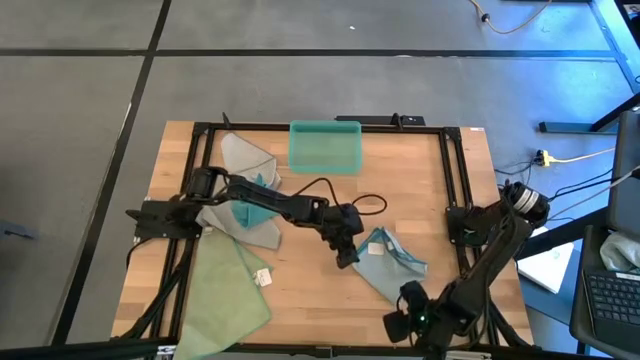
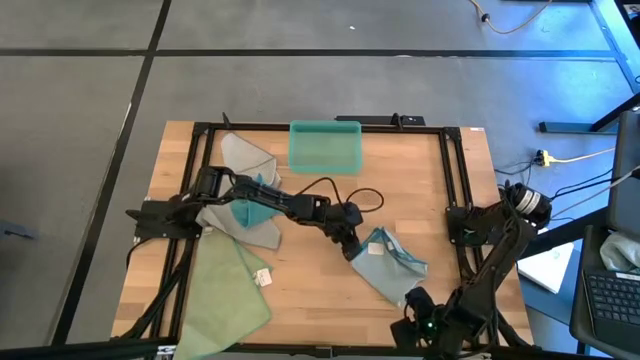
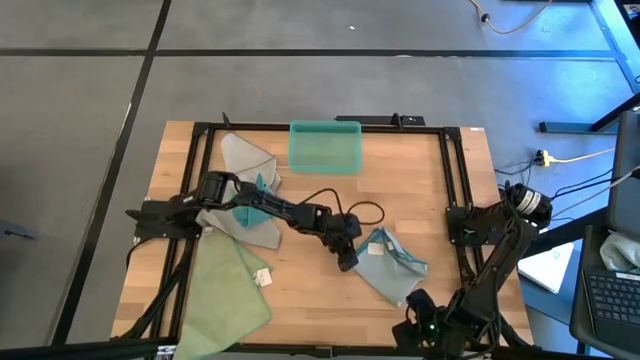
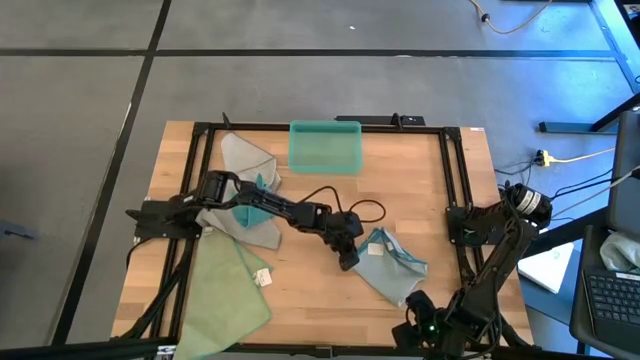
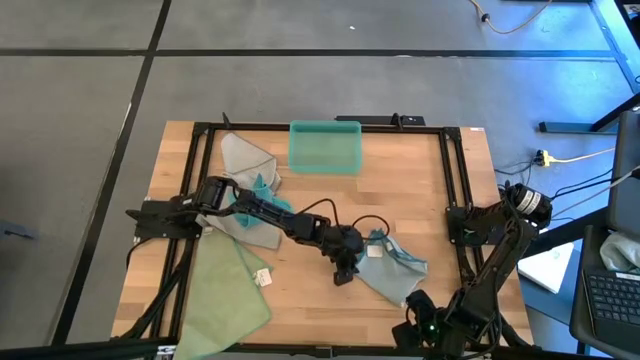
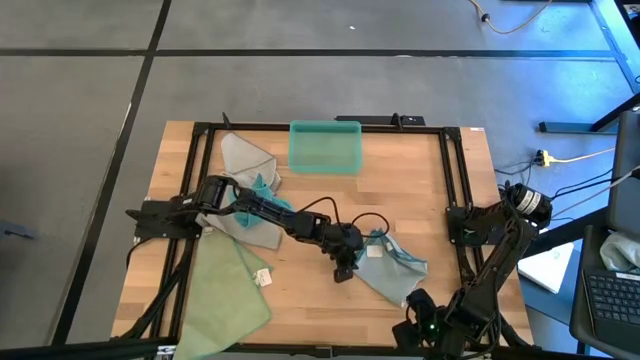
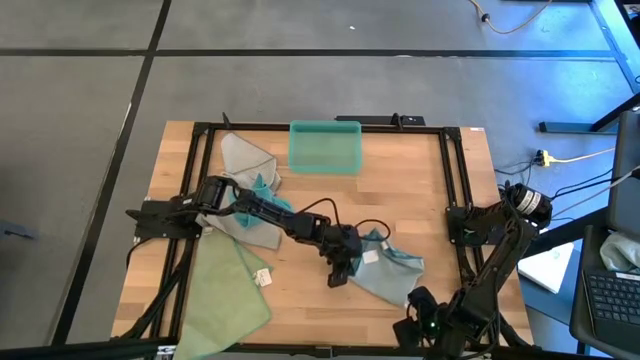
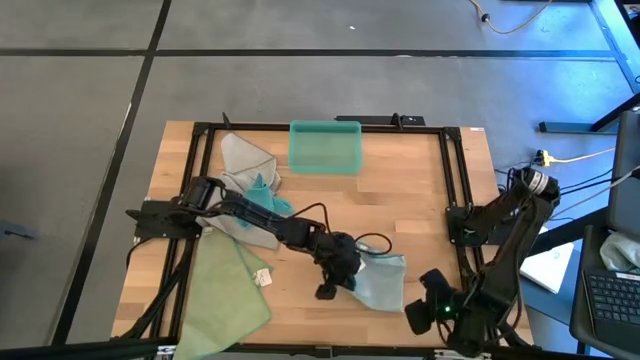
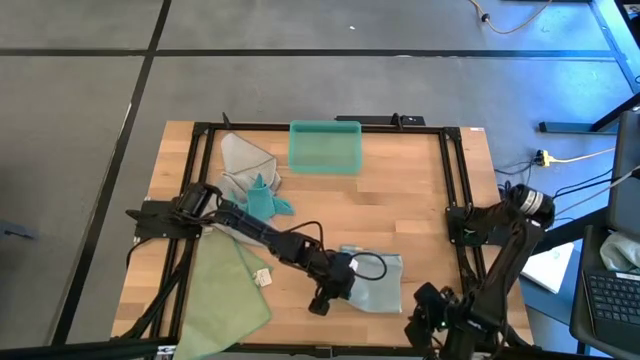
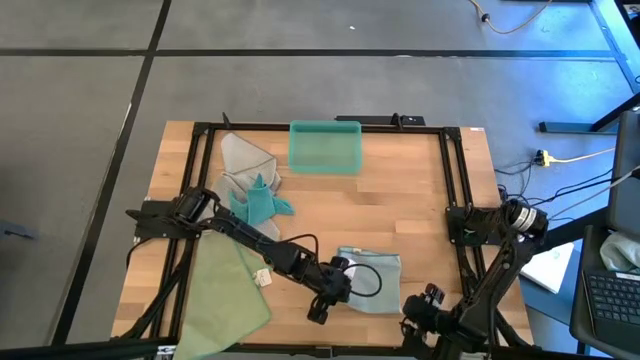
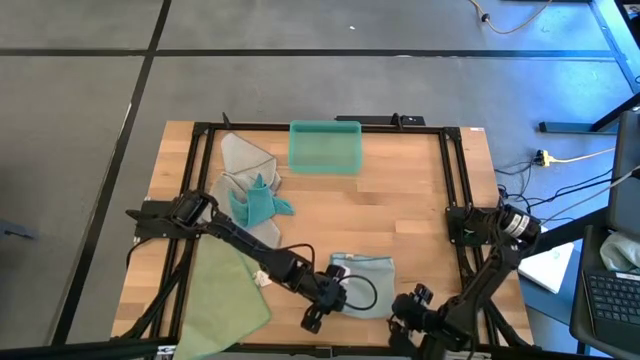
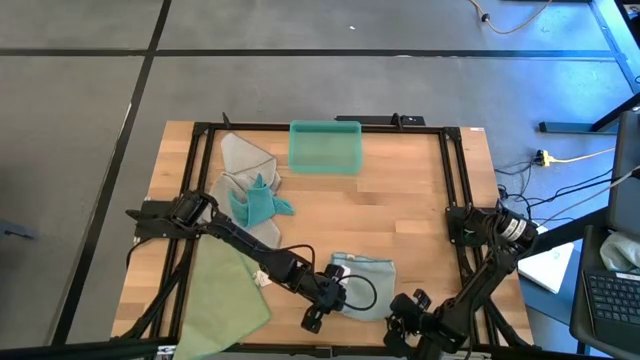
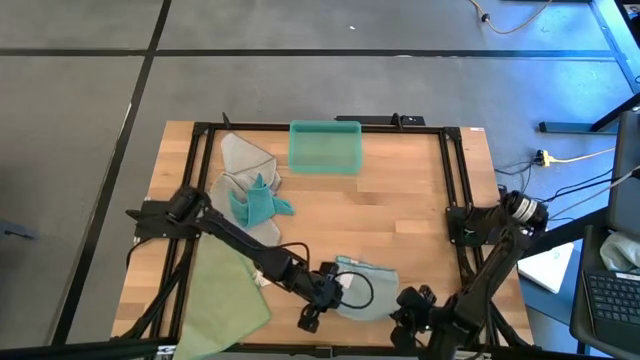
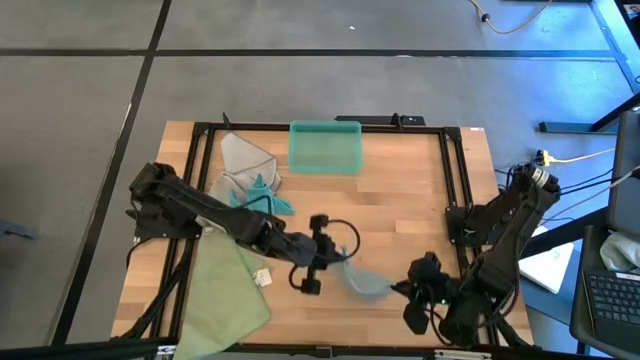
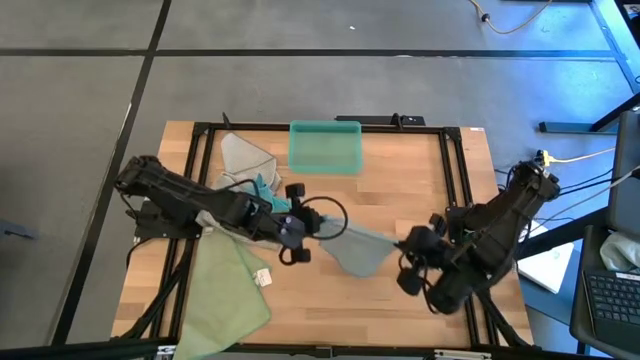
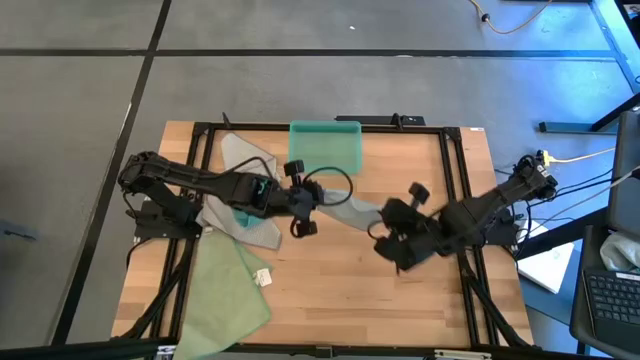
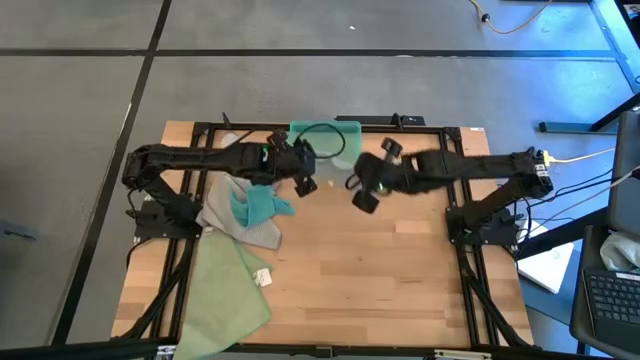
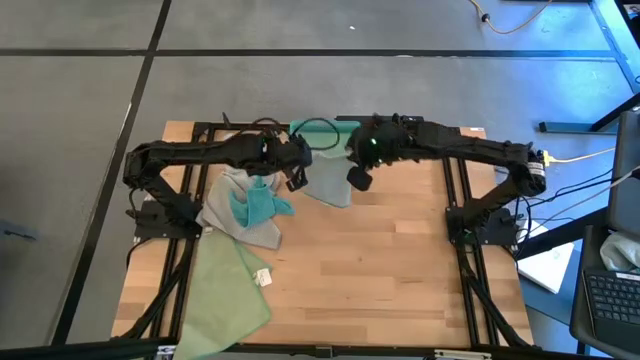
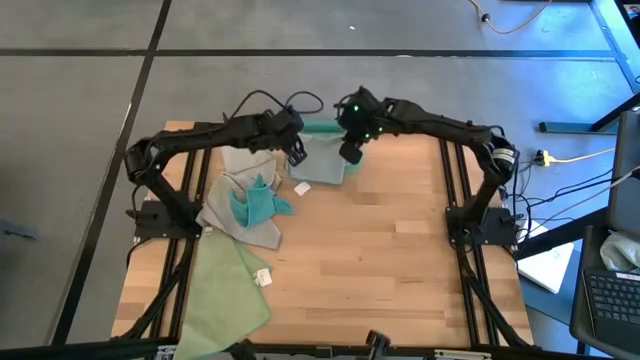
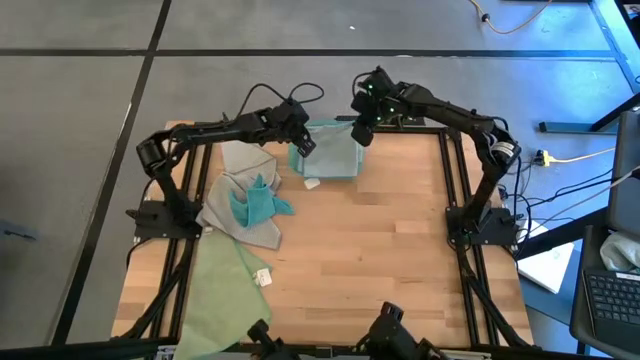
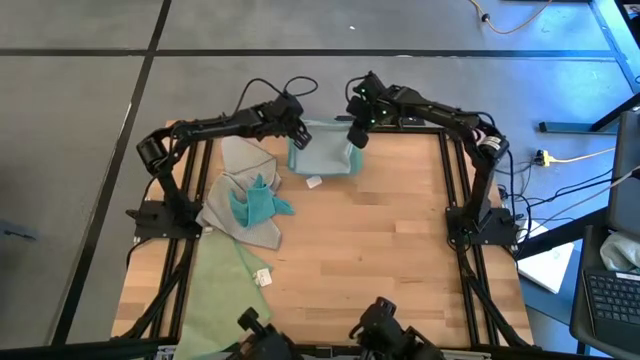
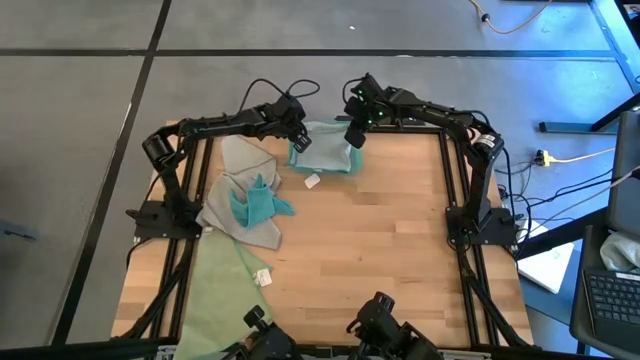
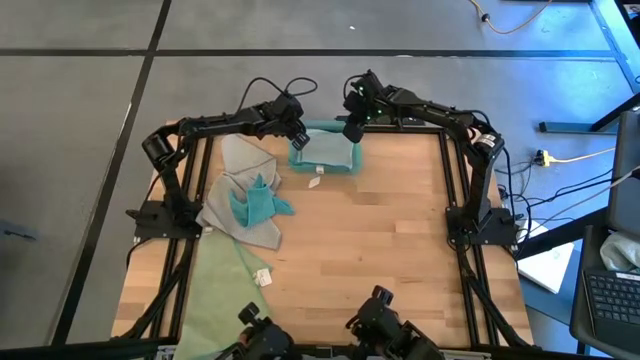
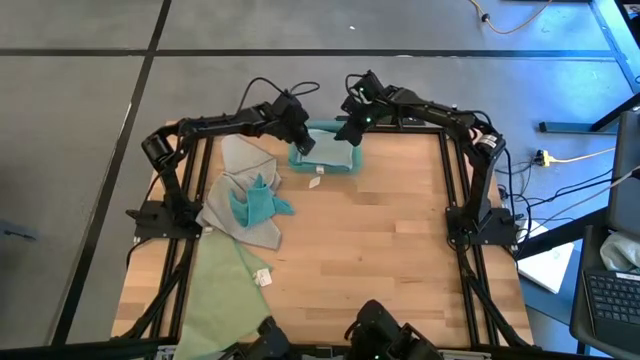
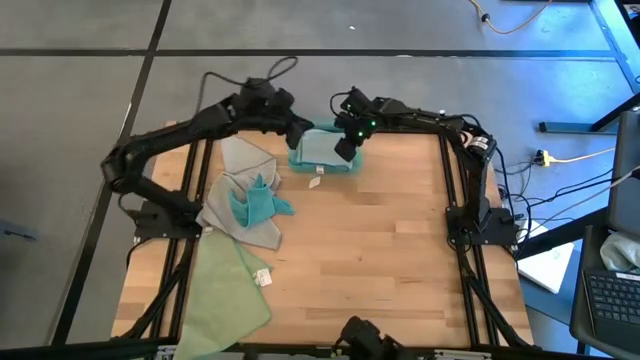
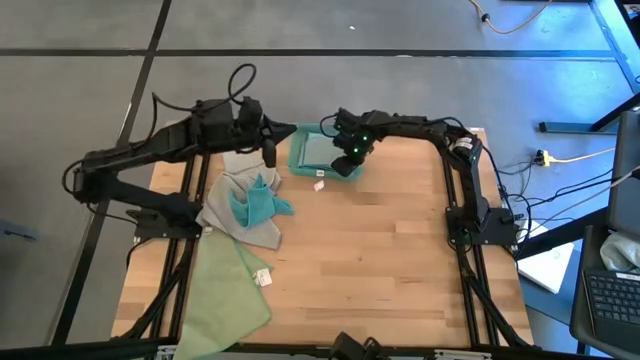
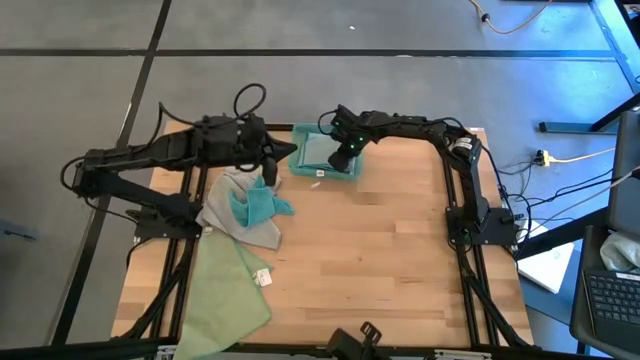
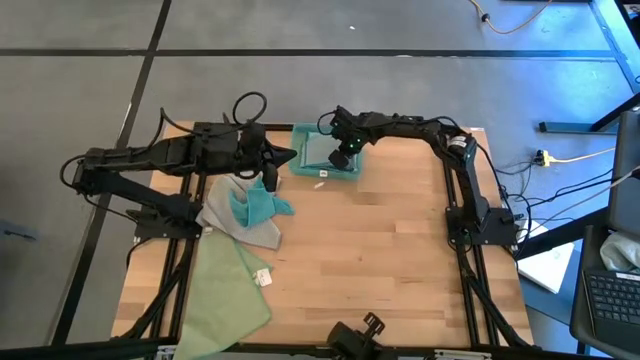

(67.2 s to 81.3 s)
Task: Fold microfiber towels
Put the folded light blue towel into the bin

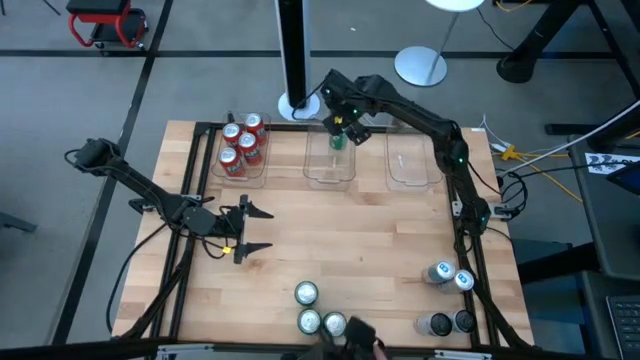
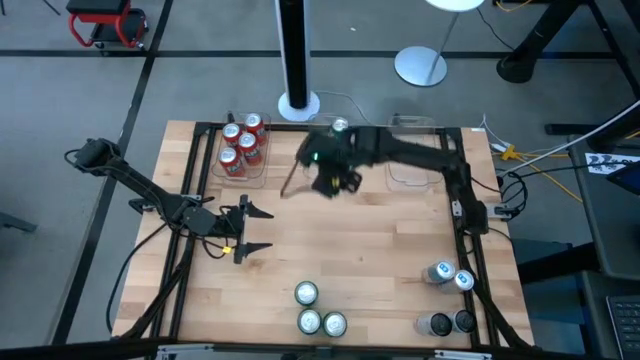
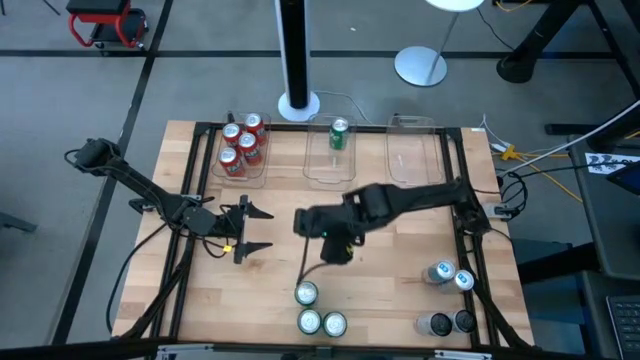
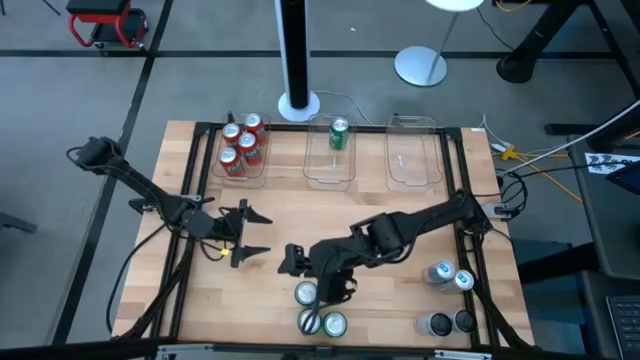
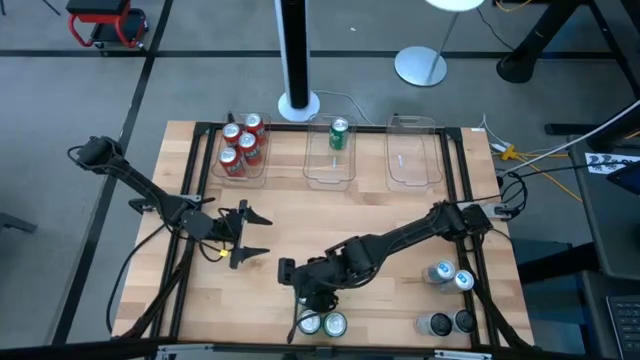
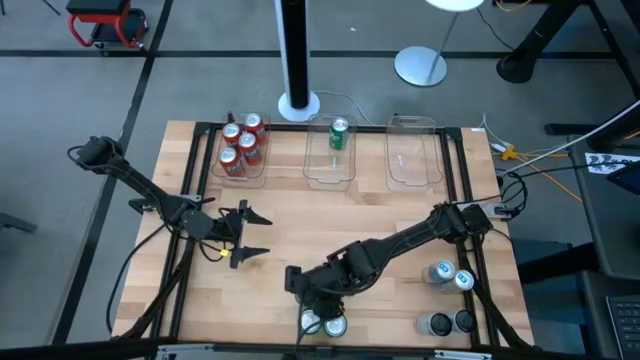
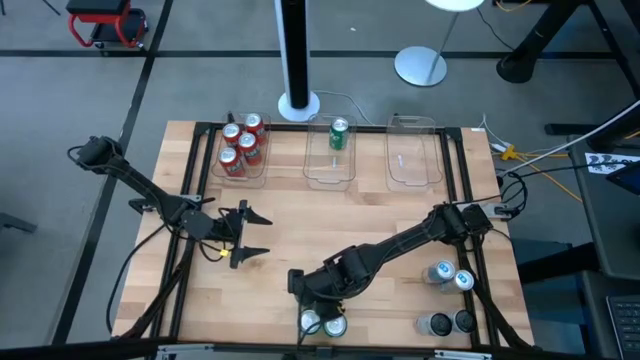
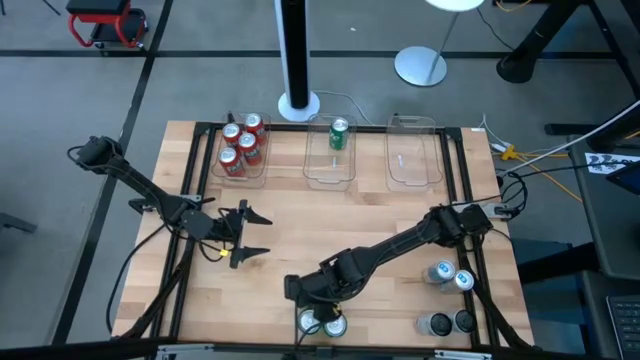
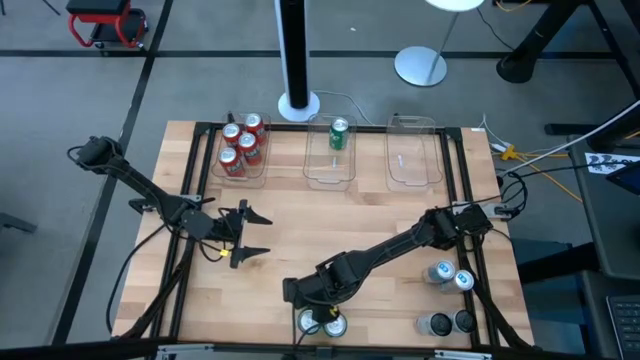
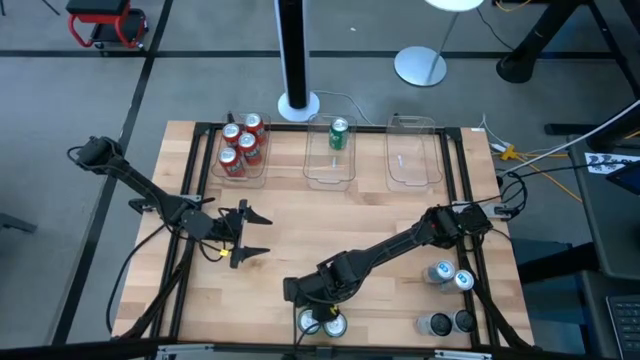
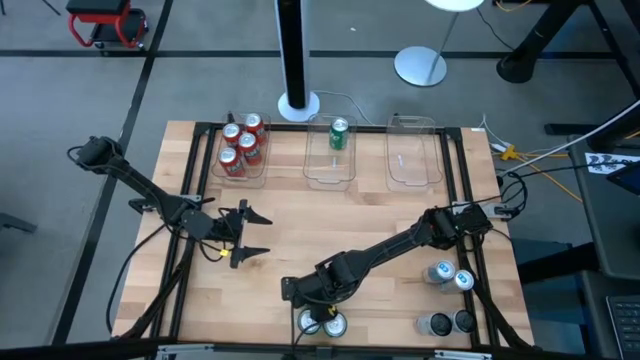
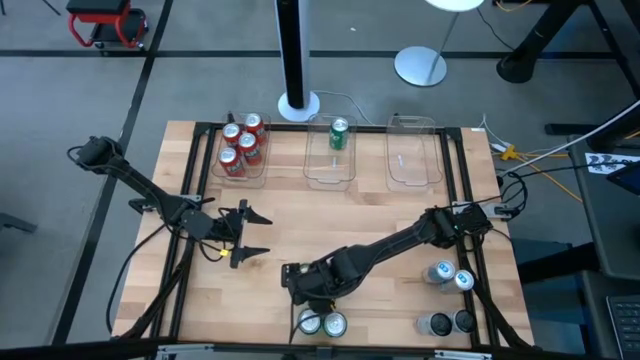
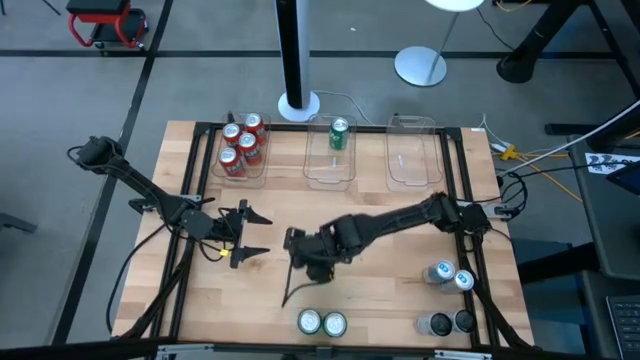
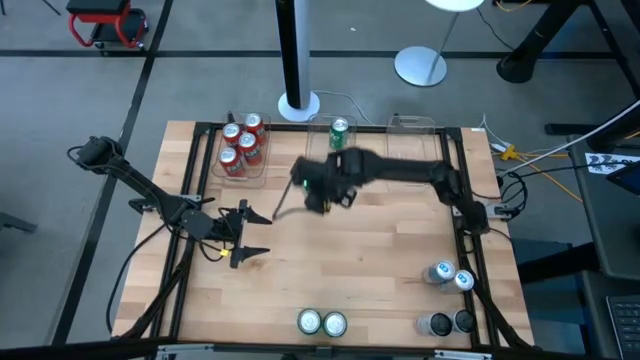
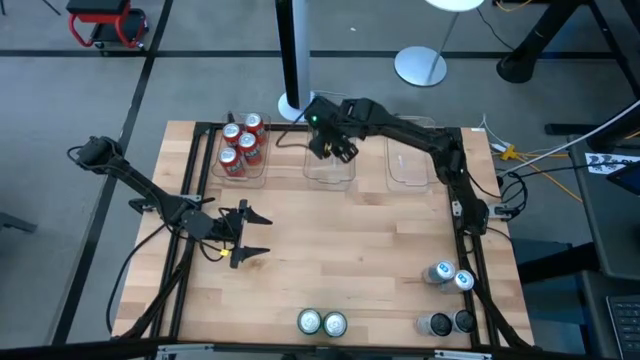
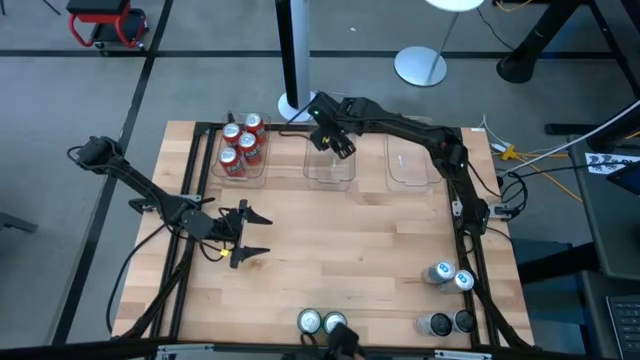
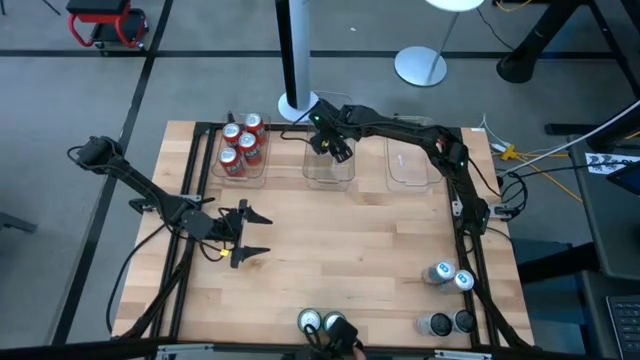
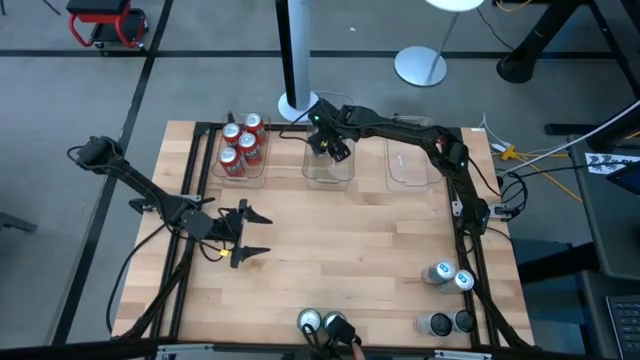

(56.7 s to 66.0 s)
Task: Sort soda cans
Put the top green soda can into the middle transparent bin
